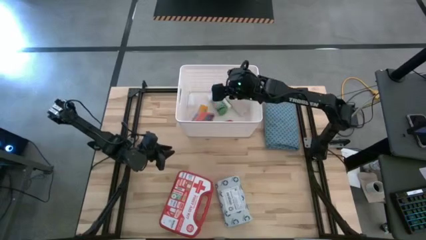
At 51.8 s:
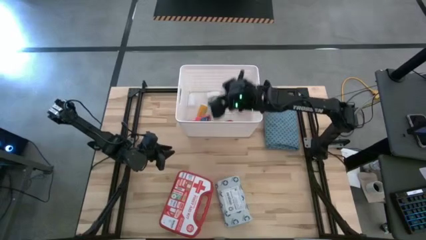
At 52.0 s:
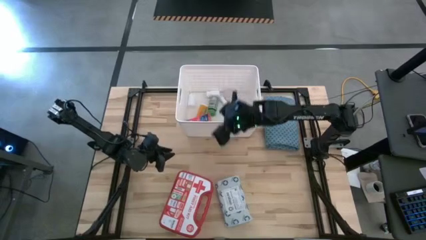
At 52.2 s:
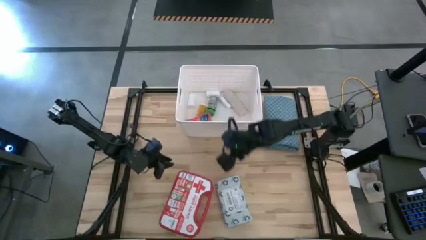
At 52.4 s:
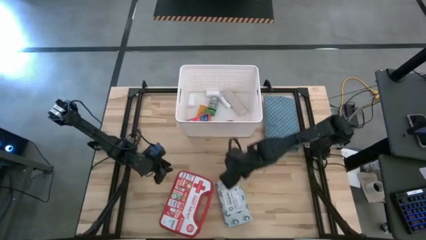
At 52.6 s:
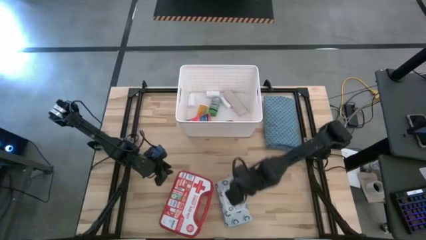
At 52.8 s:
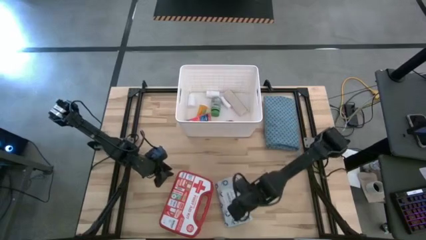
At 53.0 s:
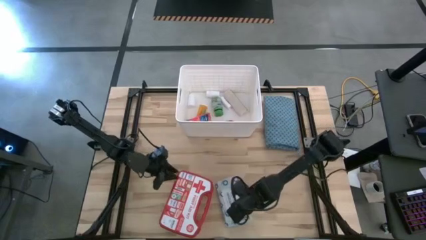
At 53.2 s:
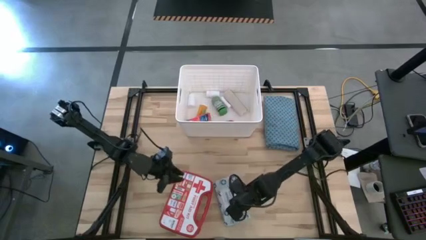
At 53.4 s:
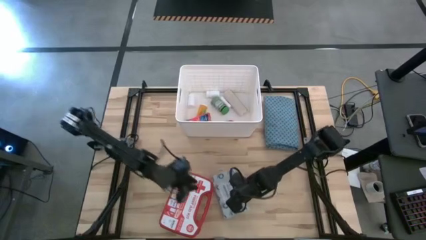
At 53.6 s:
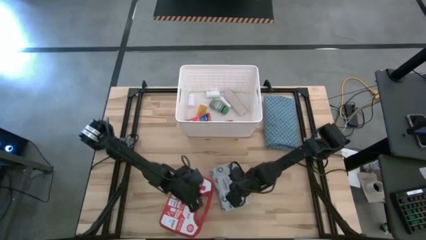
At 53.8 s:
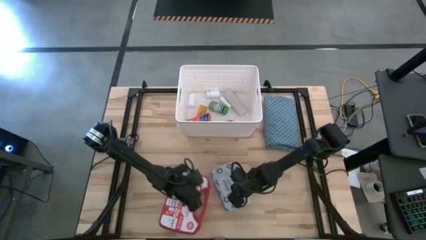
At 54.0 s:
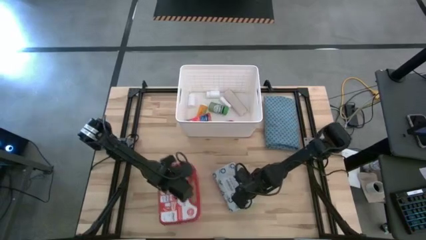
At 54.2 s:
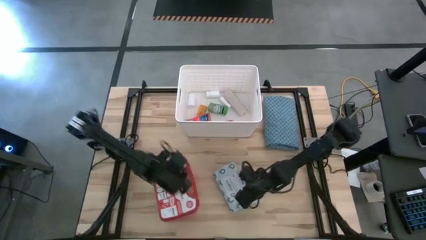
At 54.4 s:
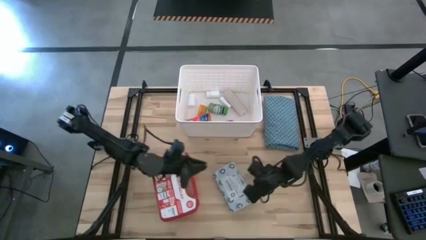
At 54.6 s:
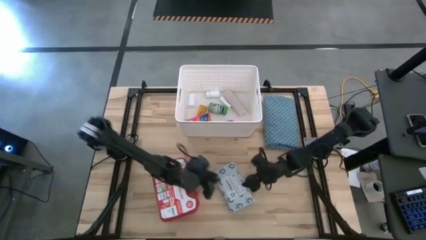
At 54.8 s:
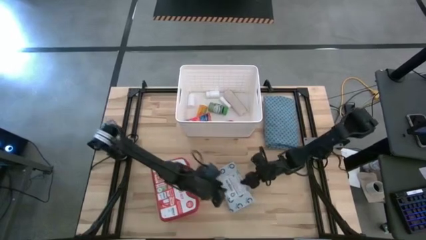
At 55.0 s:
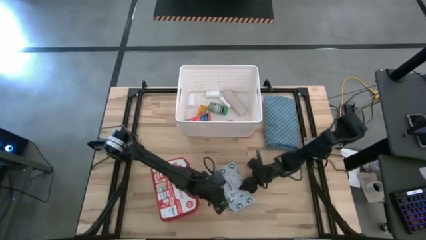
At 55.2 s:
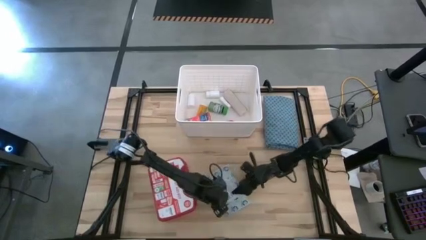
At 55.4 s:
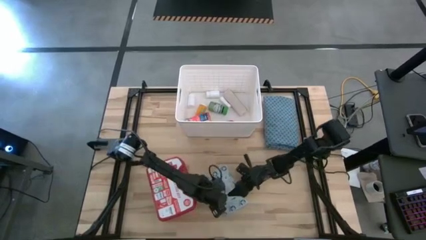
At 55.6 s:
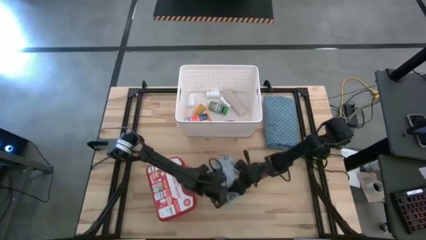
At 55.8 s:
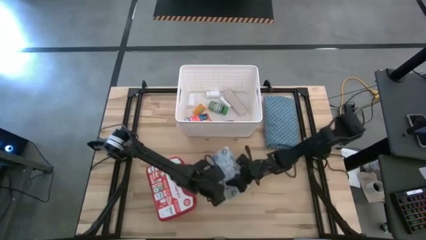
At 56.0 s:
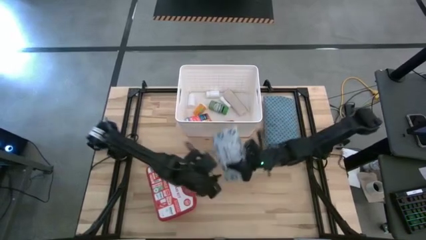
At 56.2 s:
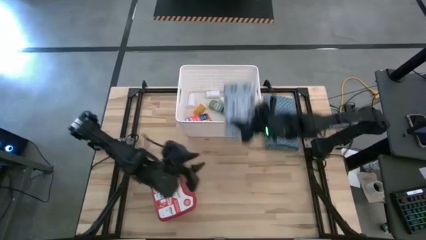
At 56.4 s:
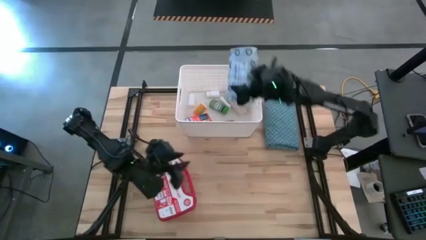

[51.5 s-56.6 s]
Task: Pick & place medical supplies in basket/bin
Put the mailer bag into the white bin

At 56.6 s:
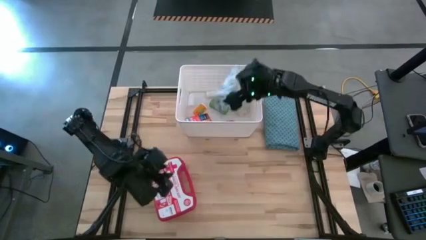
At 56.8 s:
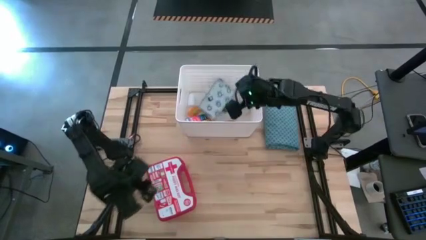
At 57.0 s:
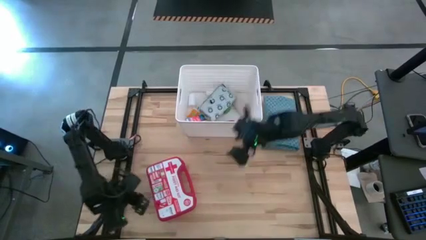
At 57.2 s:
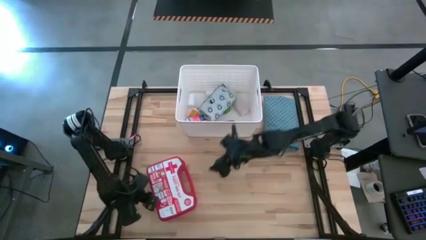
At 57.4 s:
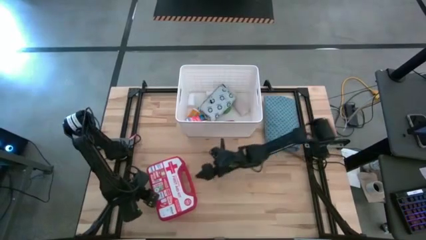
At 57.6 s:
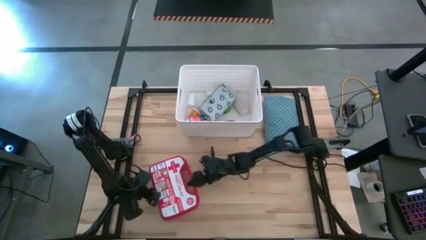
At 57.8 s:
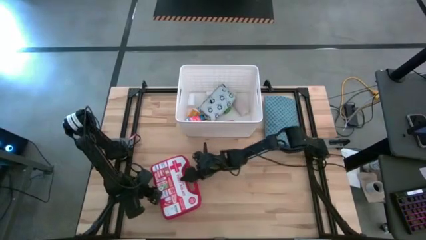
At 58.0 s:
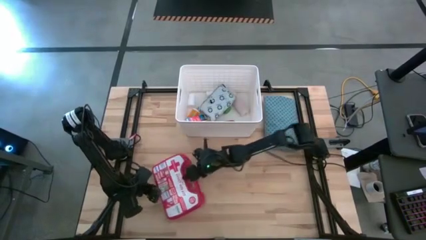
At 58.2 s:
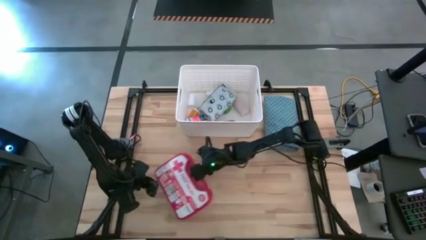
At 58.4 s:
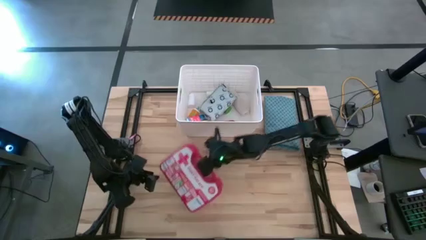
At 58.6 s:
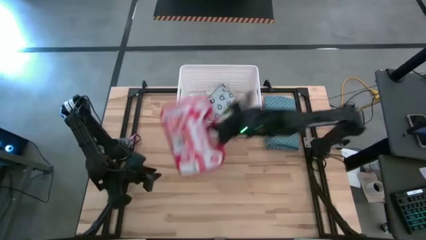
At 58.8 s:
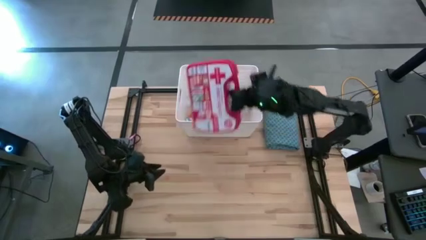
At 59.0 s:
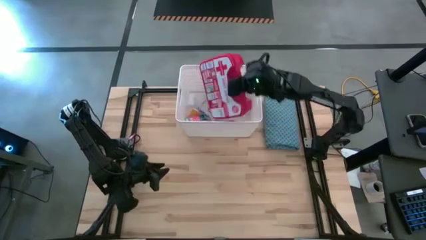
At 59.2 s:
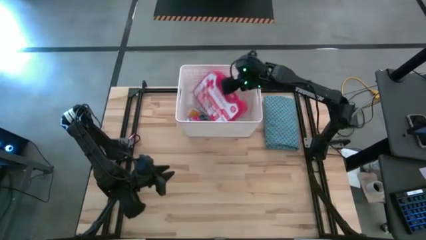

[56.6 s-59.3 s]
Put the first aid box into the white bin

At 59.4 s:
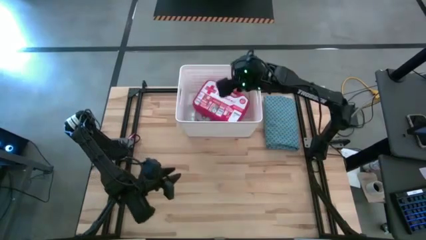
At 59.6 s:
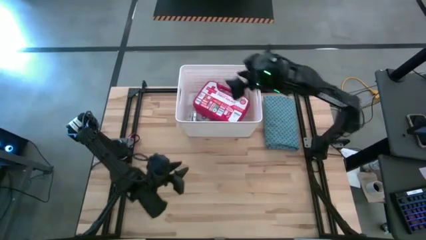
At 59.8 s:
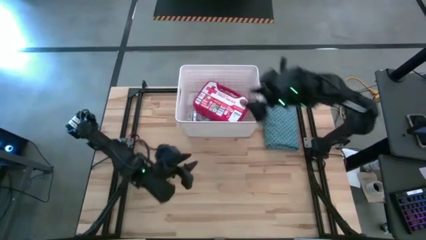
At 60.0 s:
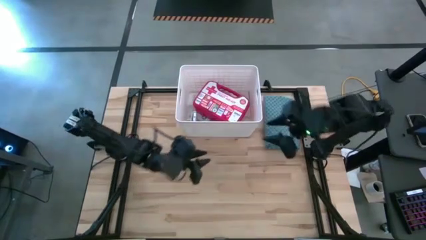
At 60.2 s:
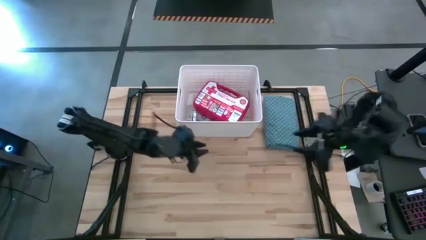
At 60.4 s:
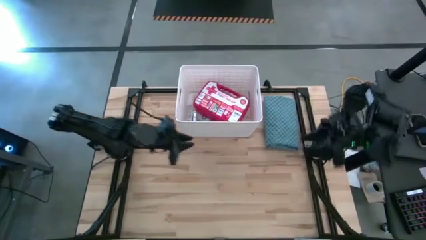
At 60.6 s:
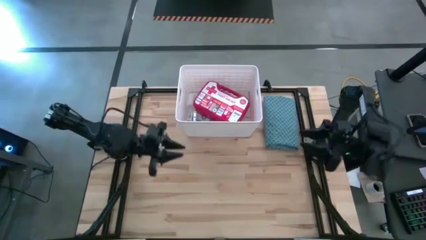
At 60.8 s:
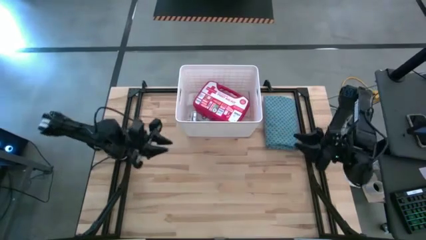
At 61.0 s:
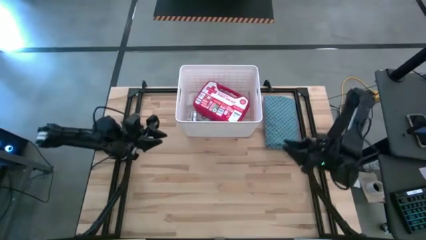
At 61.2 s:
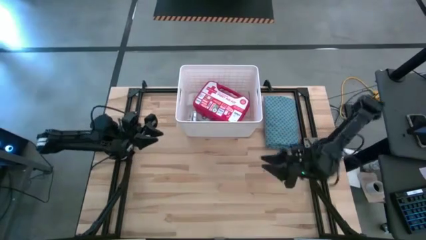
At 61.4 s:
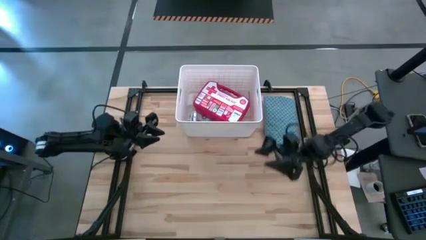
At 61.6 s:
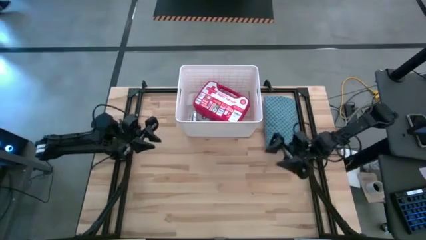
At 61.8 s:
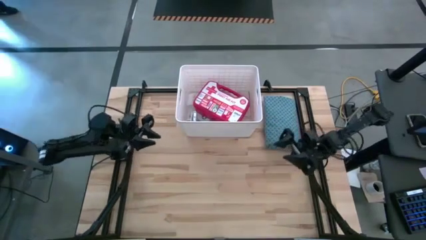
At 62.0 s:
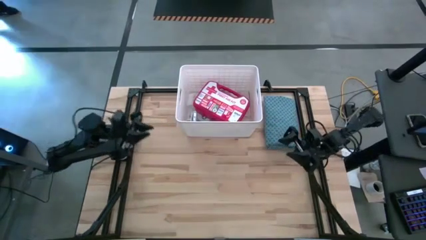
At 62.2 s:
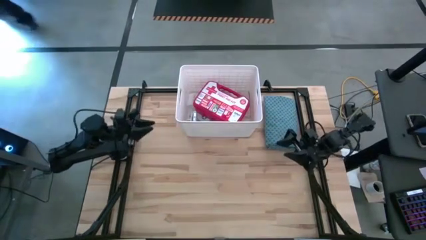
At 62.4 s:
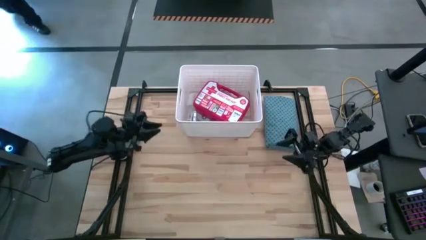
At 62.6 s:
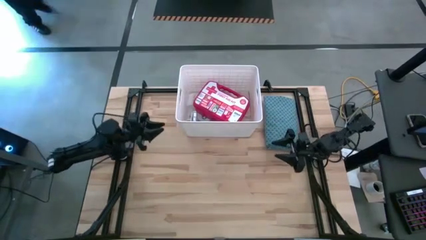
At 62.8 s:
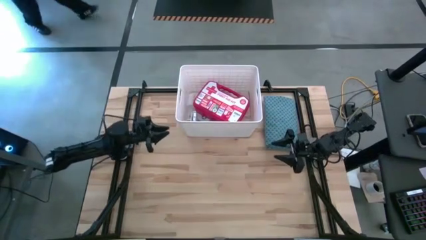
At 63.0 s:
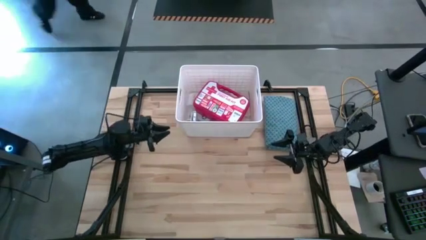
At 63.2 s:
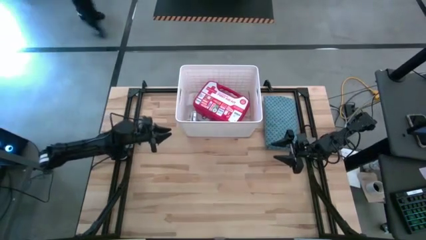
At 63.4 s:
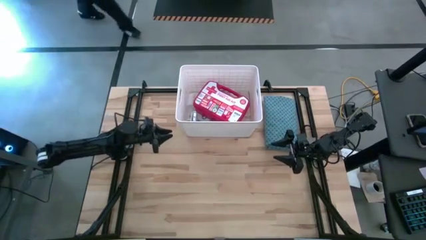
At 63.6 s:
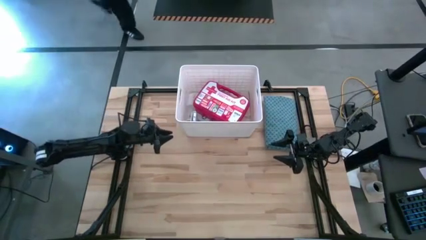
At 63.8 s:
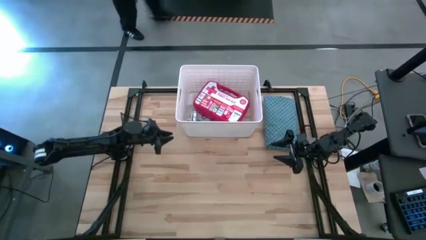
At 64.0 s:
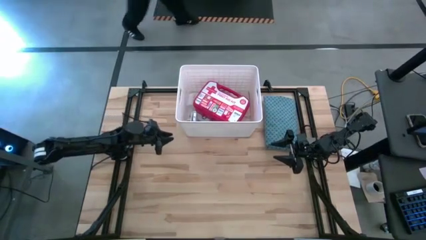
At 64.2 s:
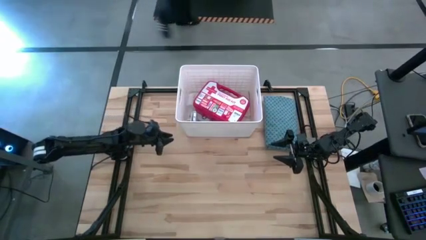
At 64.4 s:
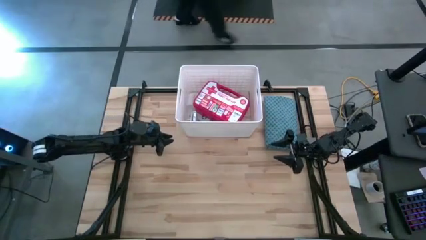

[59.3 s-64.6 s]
Return to Home Position

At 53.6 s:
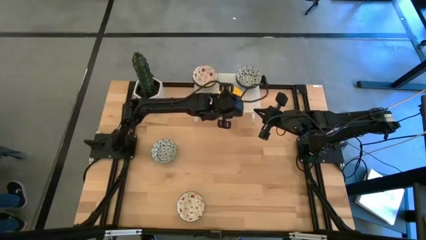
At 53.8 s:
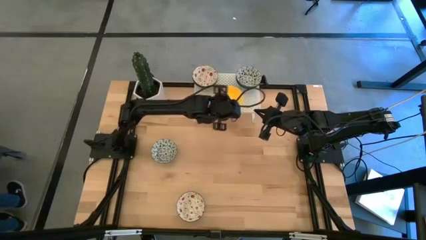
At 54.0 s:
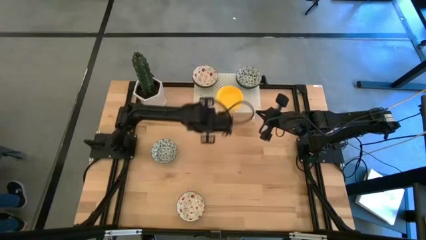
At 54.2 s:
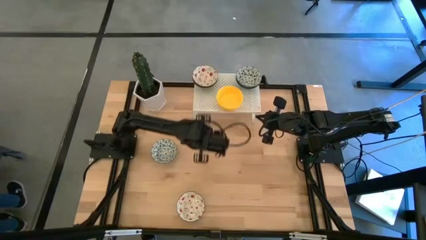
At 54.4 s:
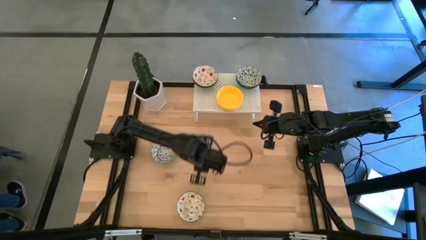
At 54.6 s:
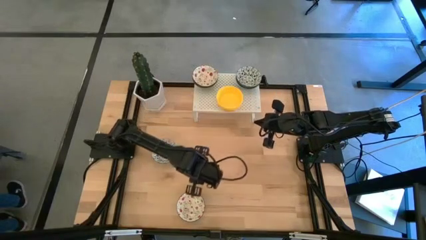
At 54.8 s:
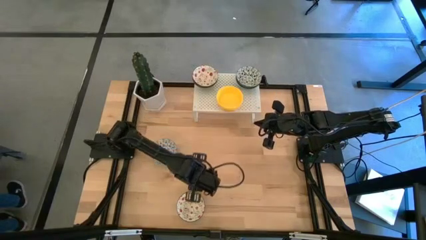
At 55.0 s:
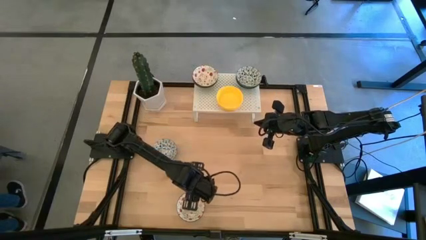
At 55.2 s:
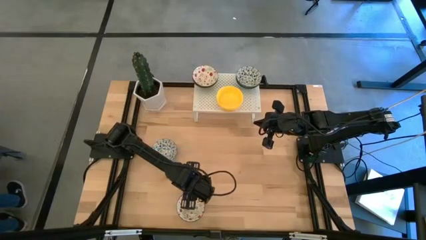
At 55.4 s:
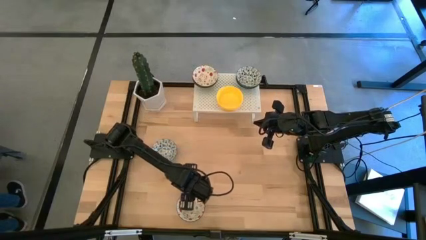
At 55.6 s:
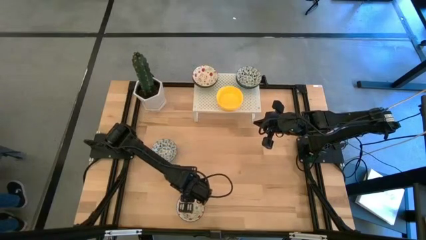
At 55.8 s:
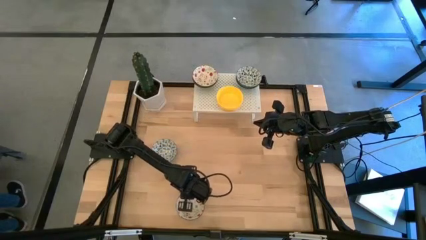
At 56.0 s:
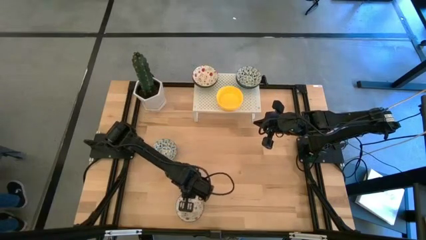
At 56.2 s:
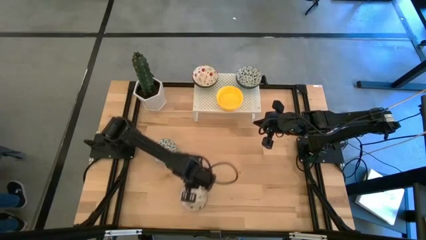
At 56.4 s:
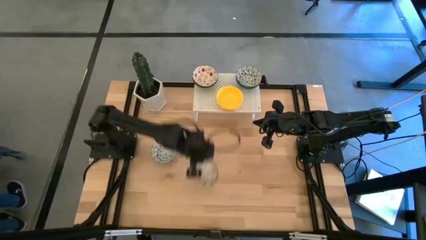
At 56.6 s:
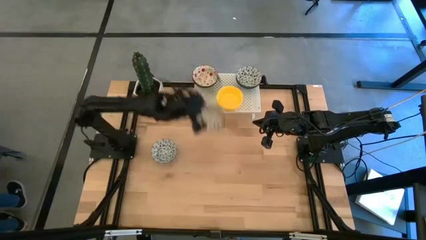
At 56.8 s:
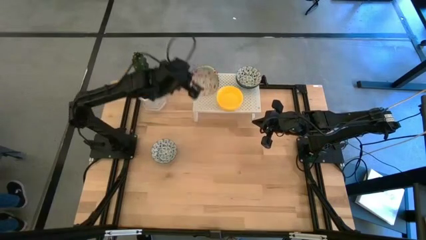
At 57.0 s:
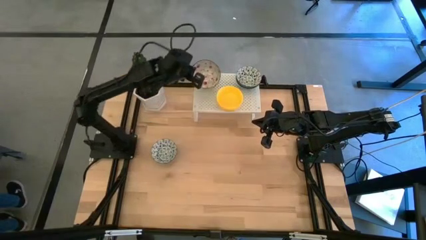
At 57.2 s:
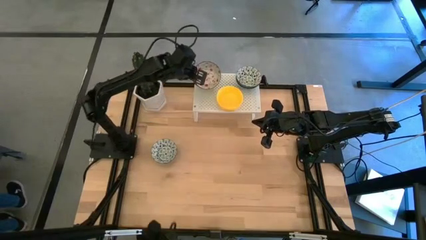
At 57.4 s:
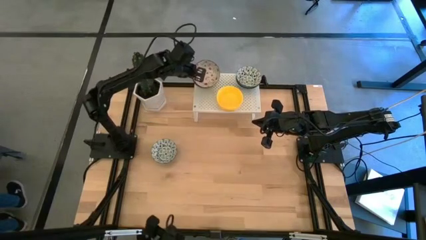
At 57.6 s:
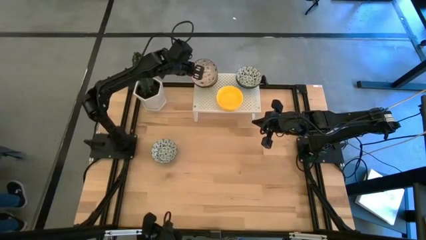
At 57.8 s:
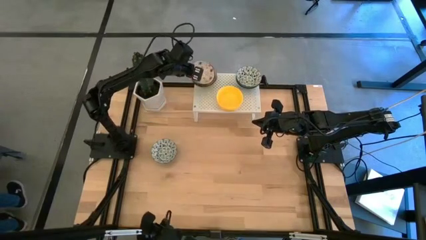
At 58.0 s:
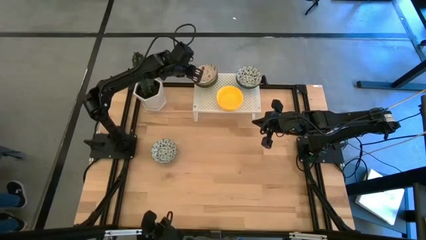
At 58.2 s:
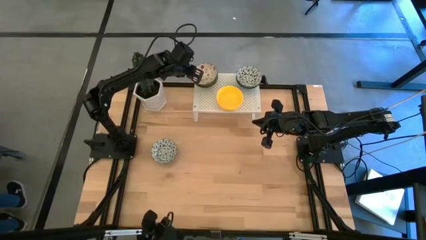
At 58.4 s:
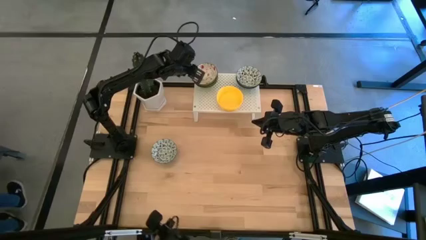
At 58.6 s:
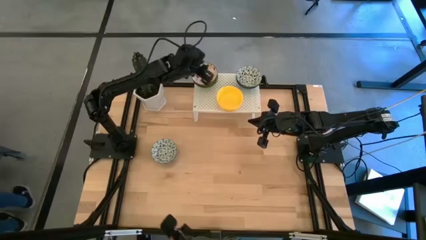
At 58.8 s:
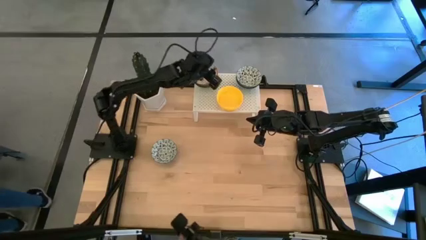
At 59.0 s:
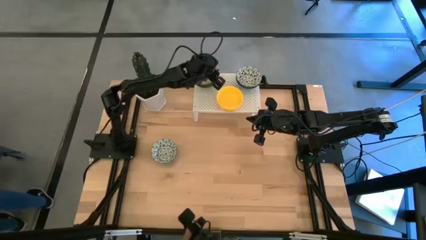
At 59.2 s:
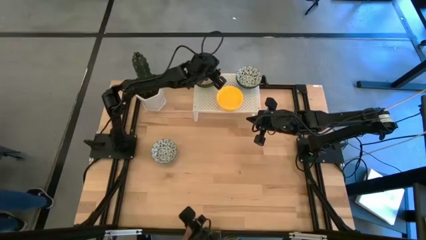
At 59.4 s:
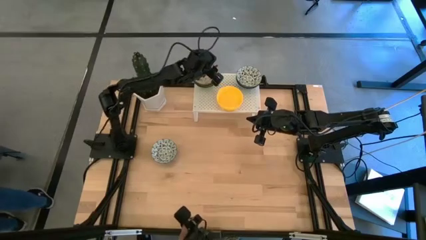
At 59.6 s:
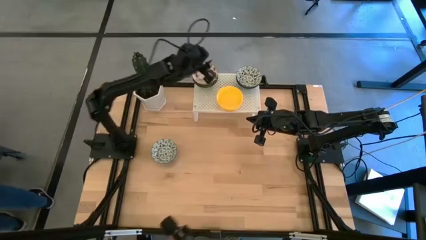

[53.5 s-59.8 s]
Task: Pick & Place Mini bowls
Stack the green patterned bowl on top of the other green patterned bowls on the shelf
